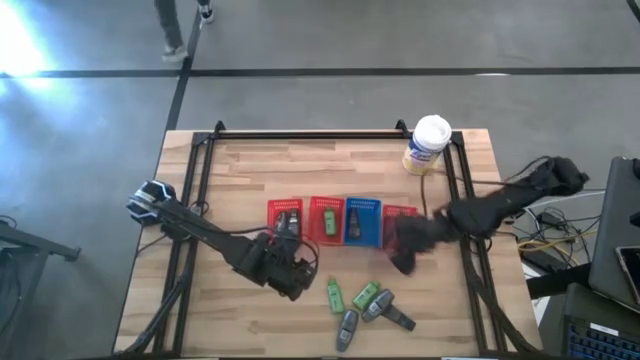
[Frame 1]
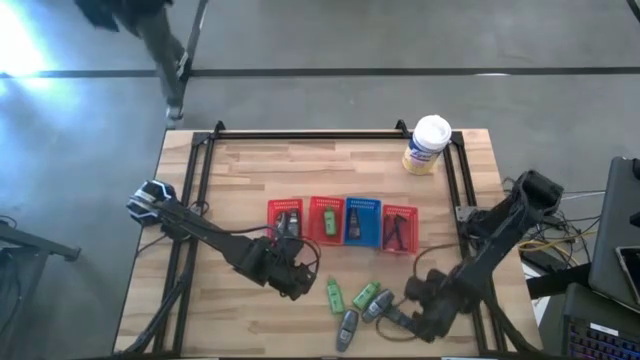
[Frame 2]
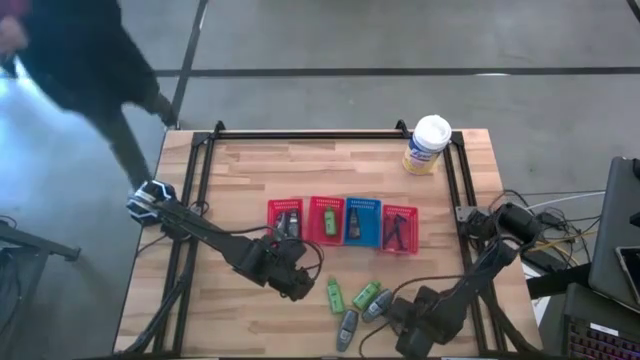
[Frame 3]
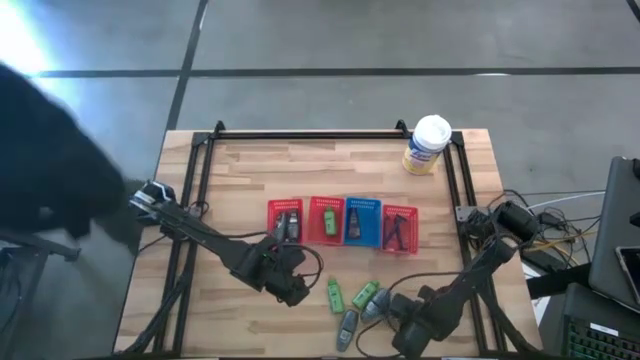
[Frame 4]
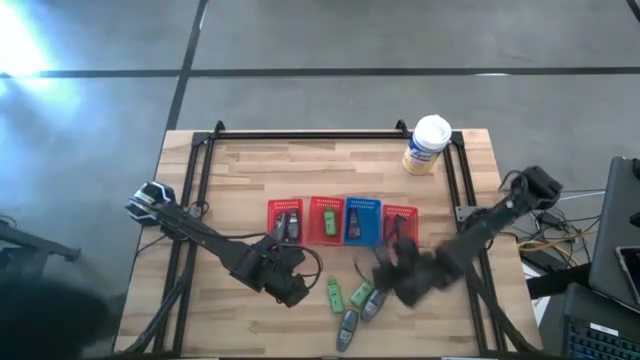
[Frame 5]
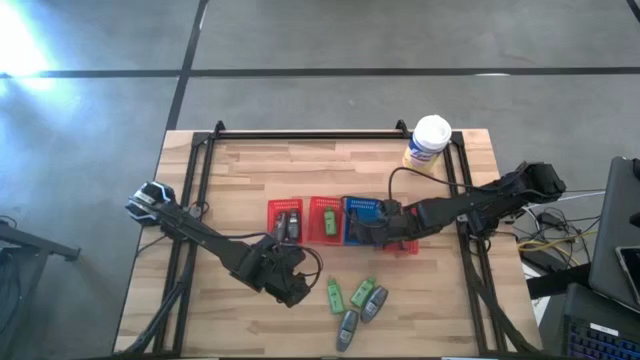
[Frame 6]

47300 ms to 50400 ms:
Task: Pick & Place Travel size toiletries
Put the blue shaving cream into the blue basket

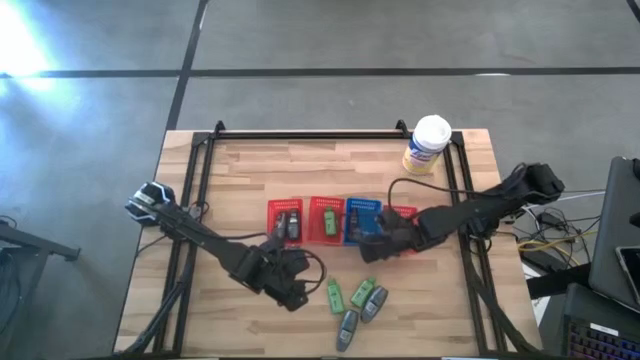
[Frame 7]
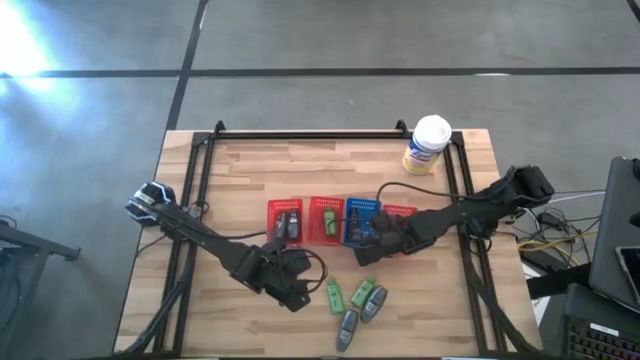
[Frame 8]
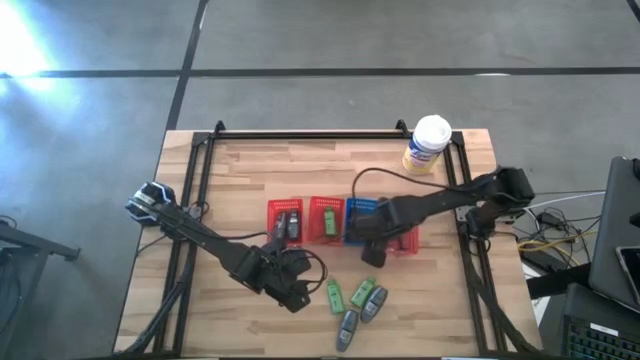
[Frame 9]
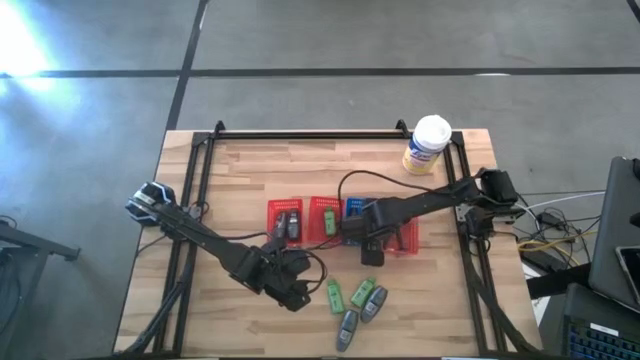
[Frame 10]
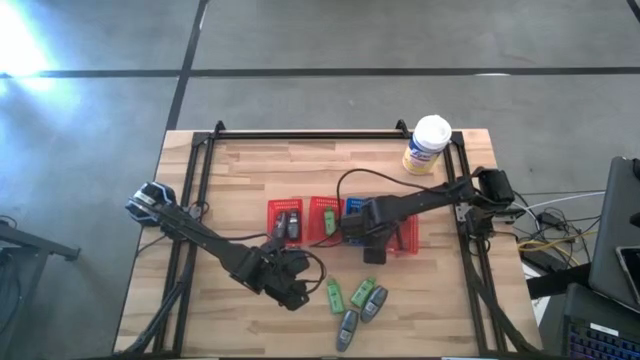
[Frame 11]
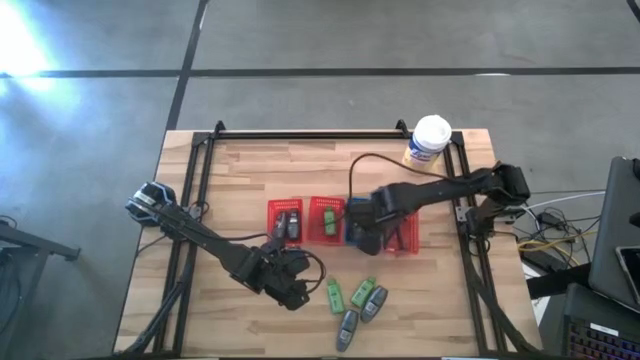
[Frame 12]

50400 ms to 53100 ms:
Adjust the blue shaving cream in the blue bin

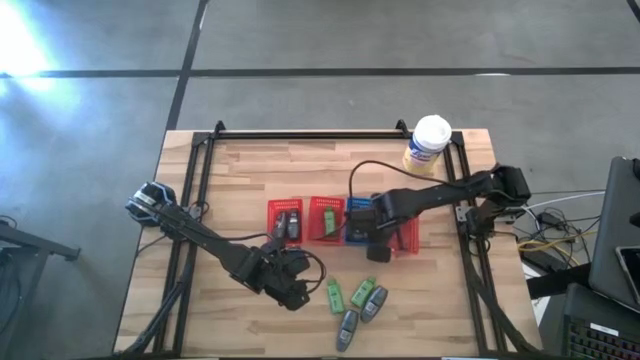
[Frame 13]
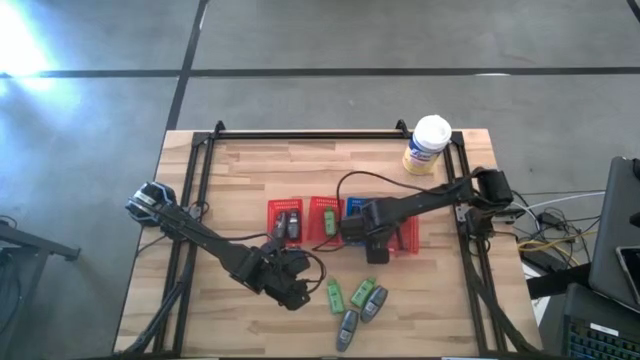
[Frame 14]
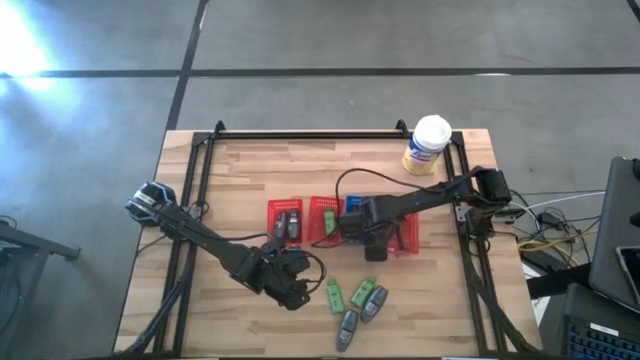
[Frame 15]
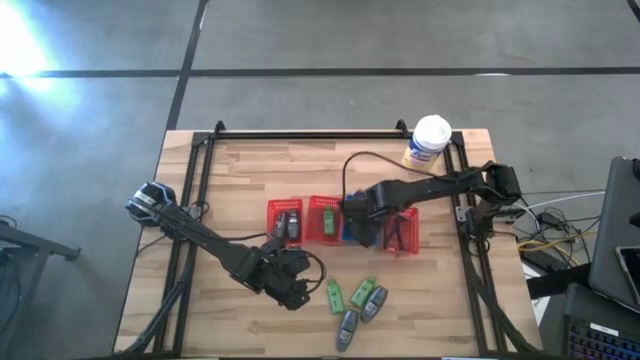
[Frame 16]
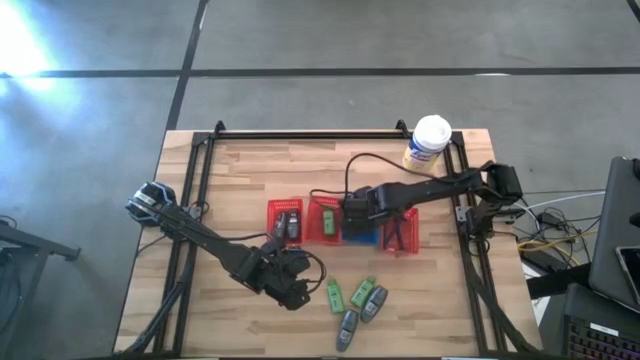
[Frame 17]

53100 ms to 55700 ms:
Adjust the blue shaving cream in the blue bin

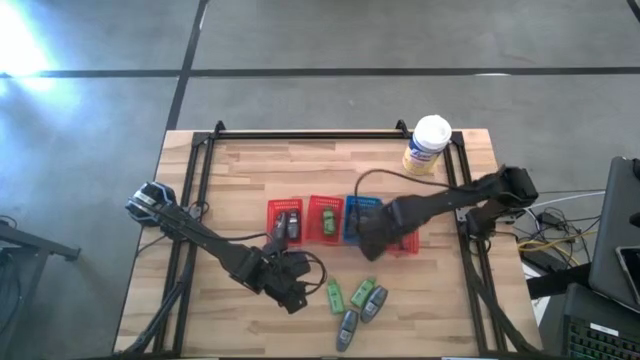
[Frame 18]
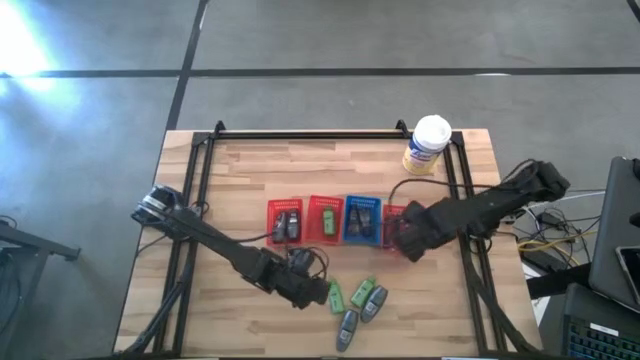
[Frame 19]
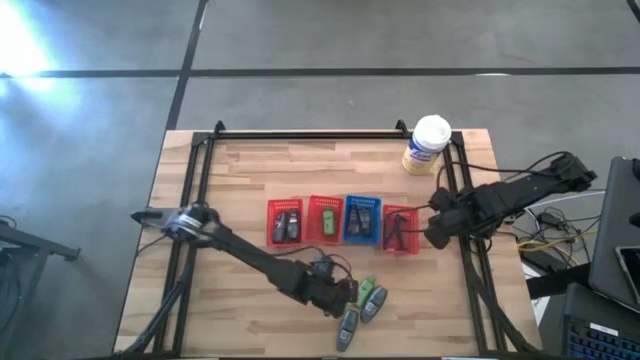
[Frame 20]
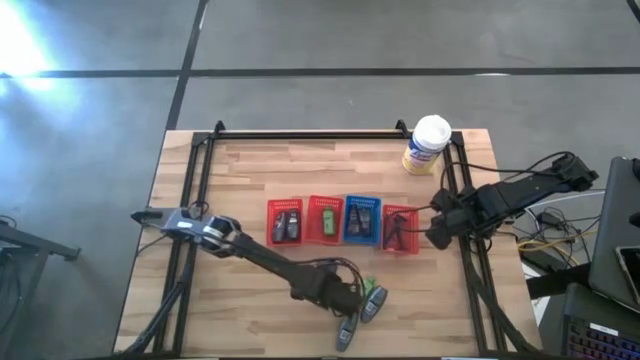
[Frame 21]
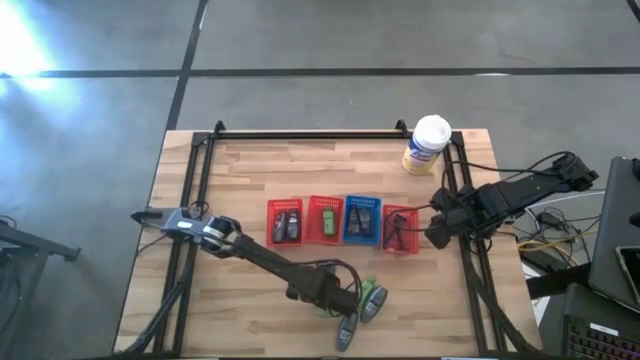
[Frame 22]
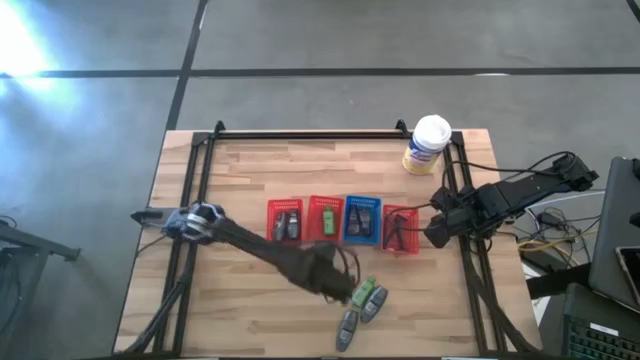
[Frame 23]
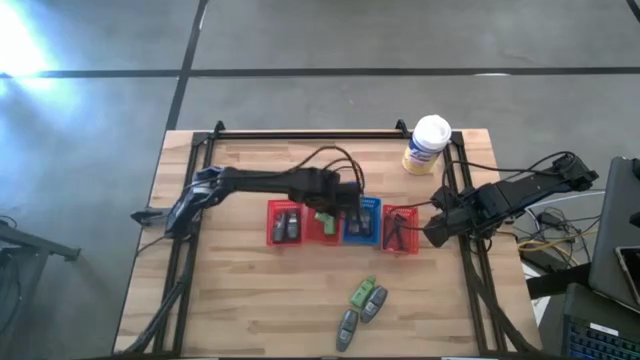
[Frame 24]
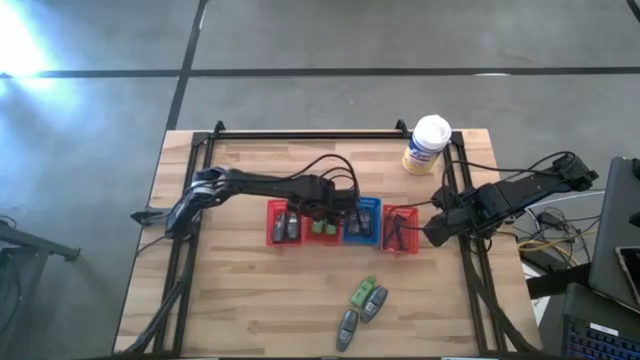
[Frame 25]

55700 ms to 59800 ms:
Put the green shampoo into the middle orange basket

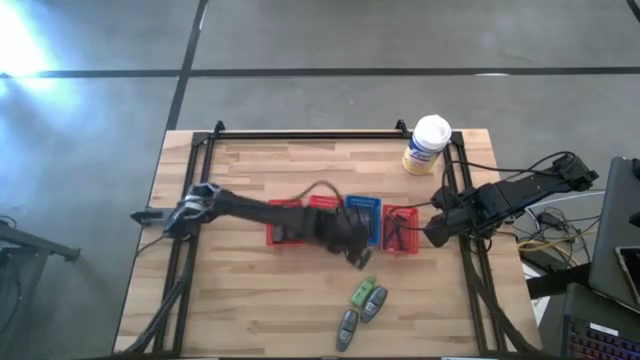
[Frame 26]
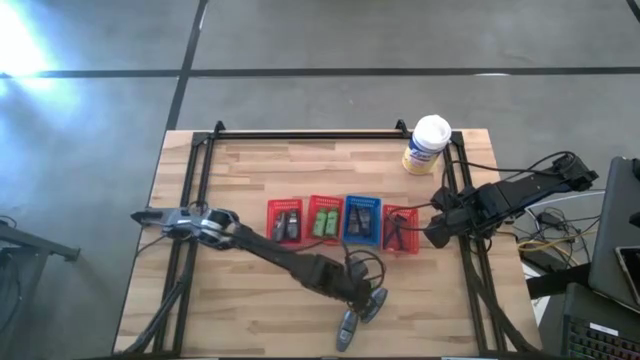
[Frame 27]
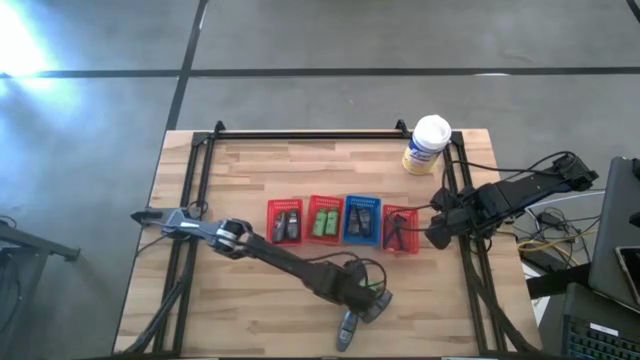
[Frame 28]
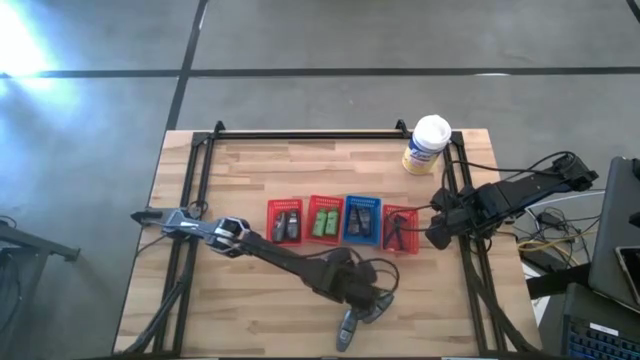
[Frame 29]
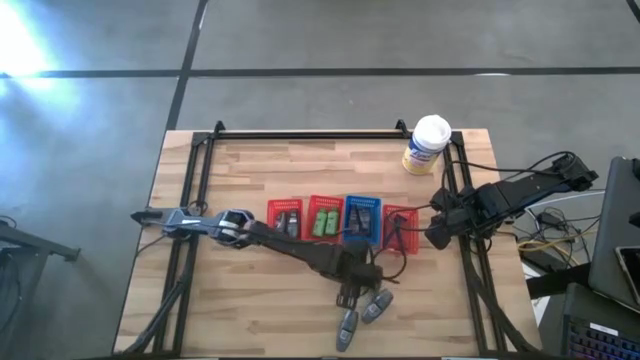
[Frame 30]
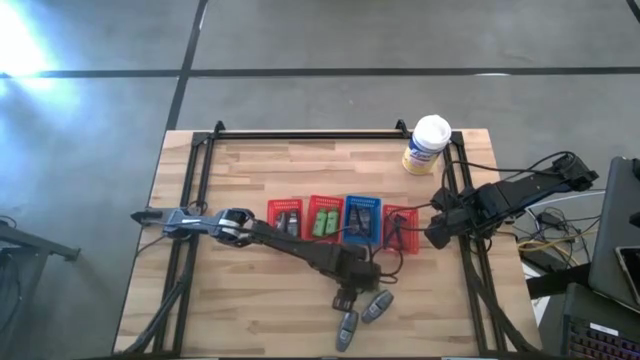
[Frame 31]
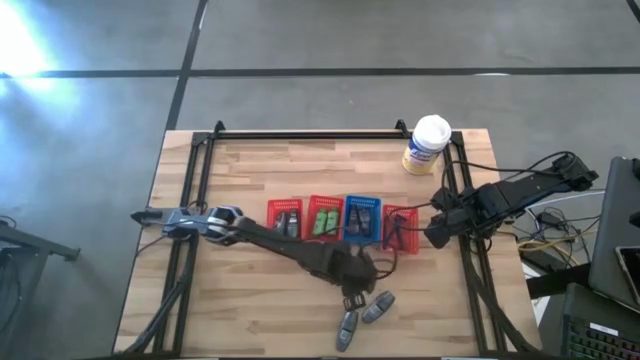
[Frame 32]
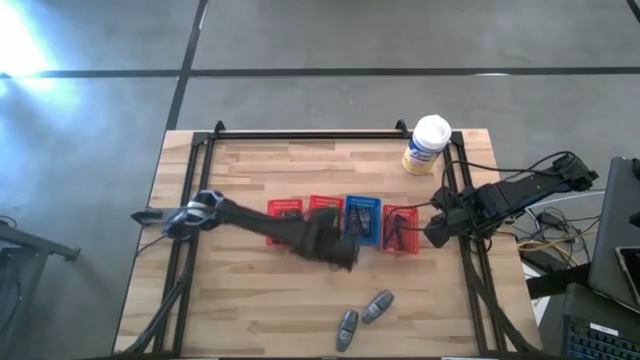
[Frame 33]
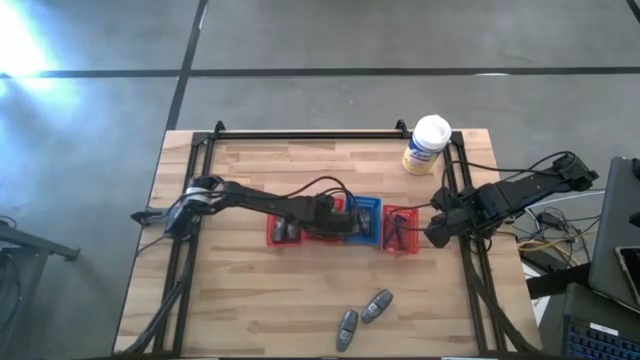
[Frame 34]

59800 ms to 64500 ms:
Put the green shampoo into the middle orange basket

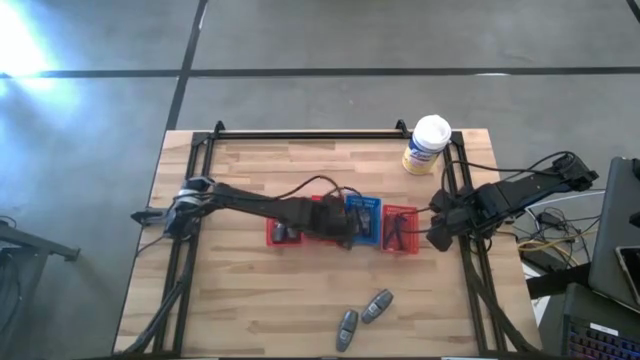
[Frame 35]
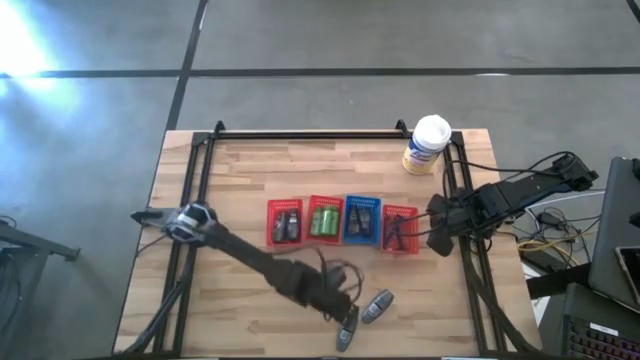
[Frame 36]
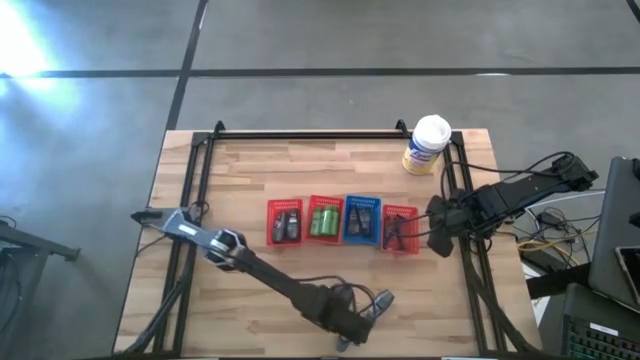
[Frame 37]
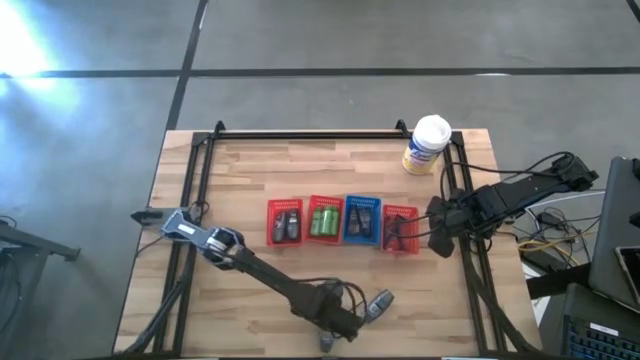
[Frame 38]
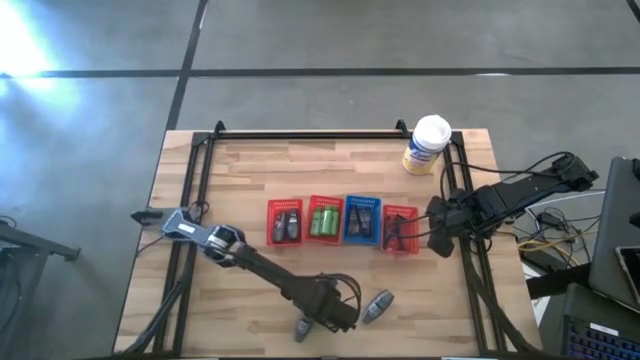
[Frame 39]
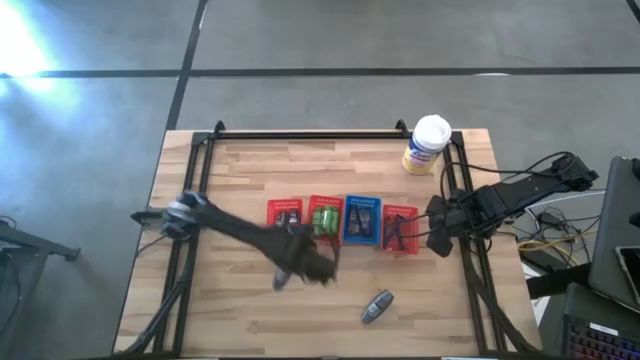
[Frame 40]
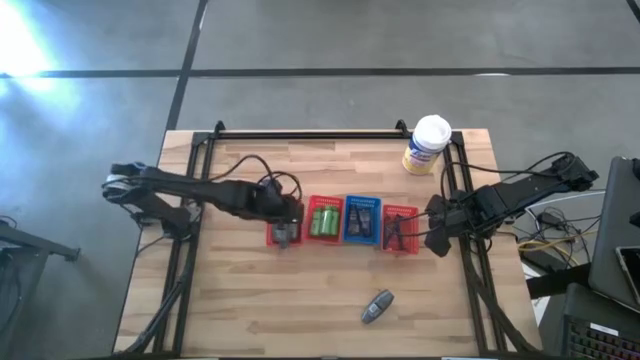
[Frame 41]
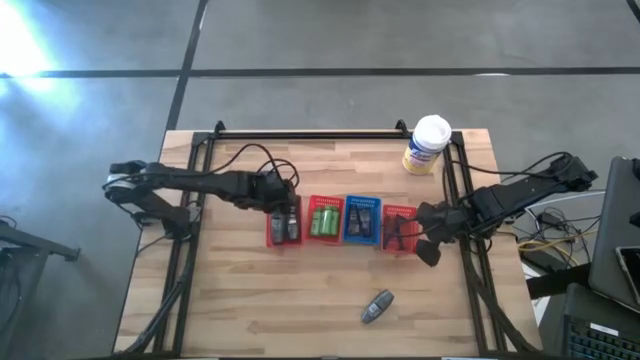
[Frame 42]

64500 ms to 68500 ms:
Put the gray deodorant into the left orange basket

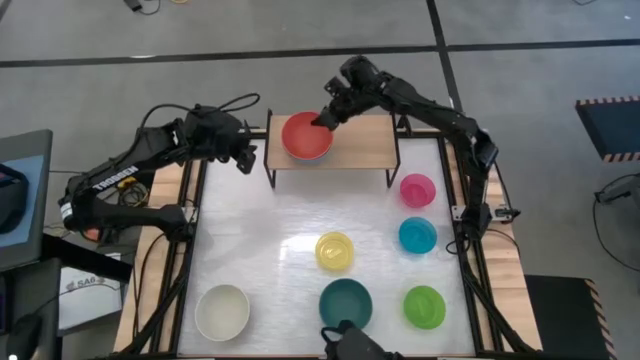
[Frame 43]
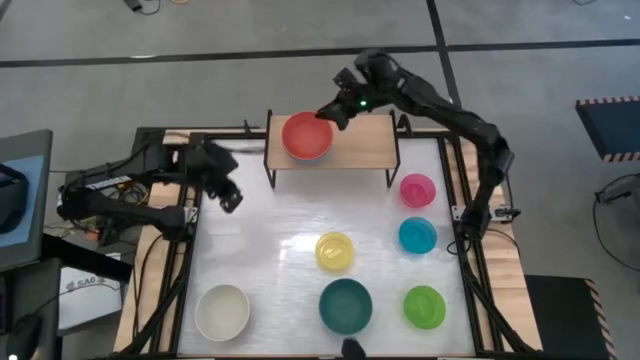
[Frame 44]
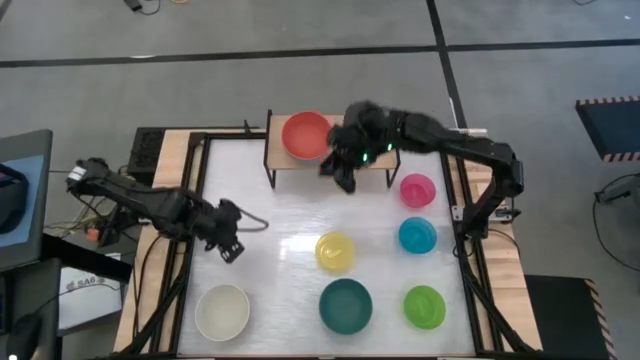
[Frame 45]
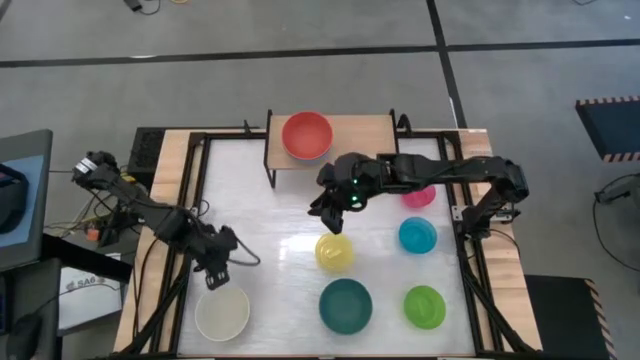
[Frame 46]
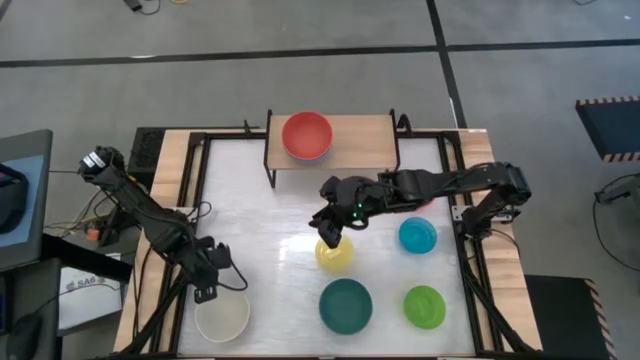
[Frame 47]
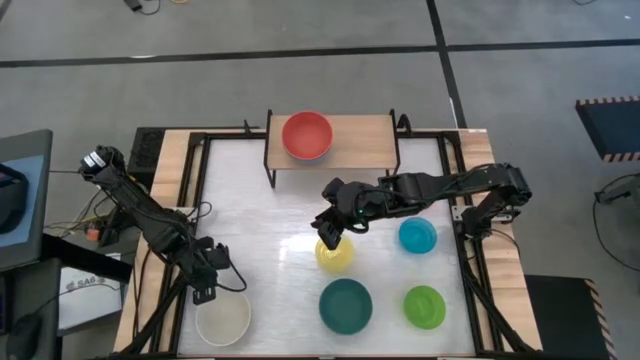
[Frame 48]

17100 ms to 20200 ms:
Task: Place and stack bowls onto a shelf
Stack the white bowl on top of the orange bowl on the shelf
